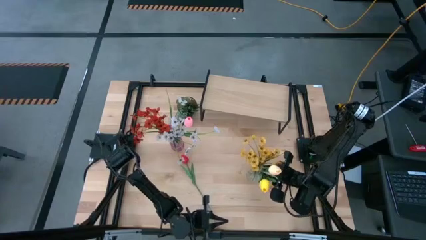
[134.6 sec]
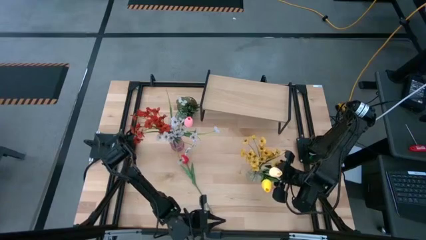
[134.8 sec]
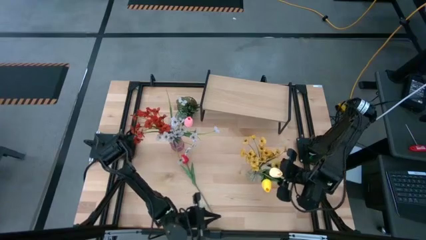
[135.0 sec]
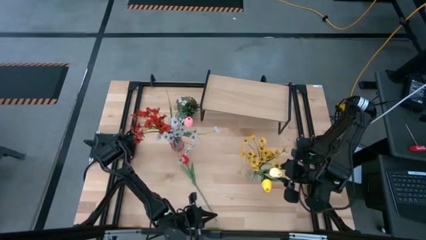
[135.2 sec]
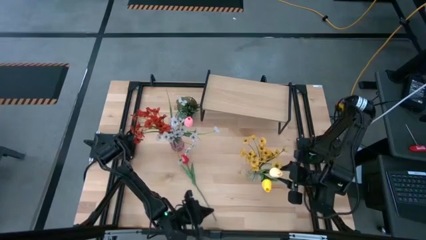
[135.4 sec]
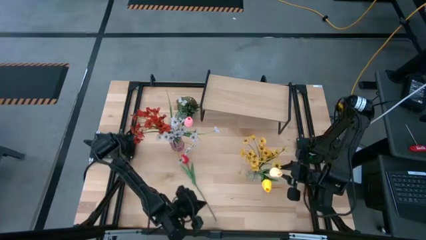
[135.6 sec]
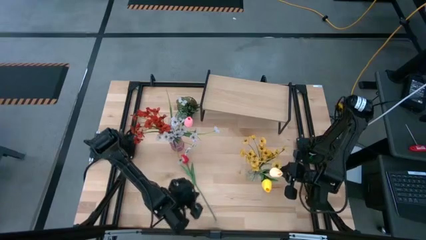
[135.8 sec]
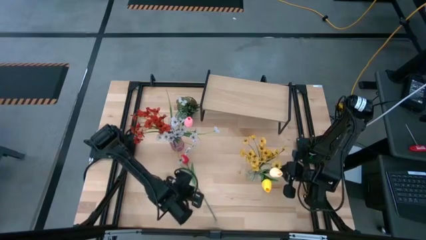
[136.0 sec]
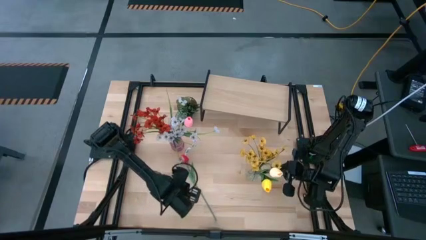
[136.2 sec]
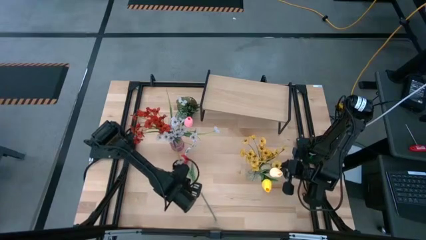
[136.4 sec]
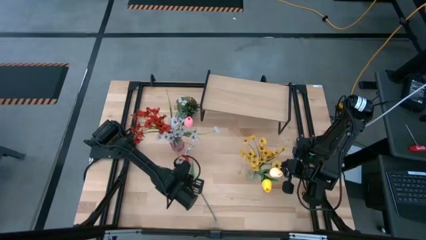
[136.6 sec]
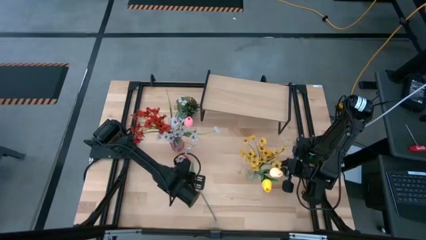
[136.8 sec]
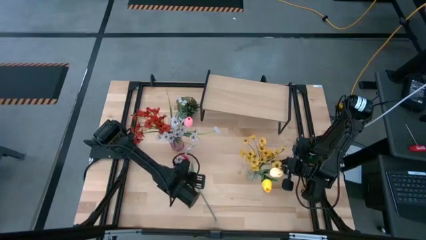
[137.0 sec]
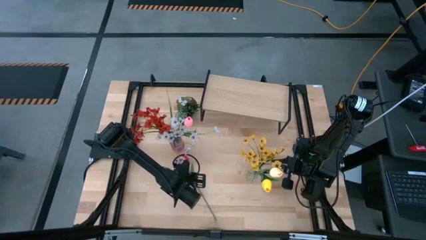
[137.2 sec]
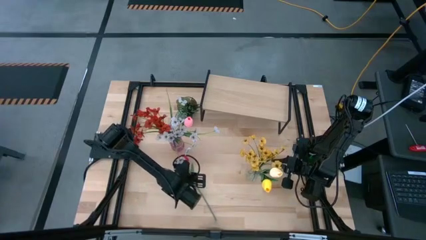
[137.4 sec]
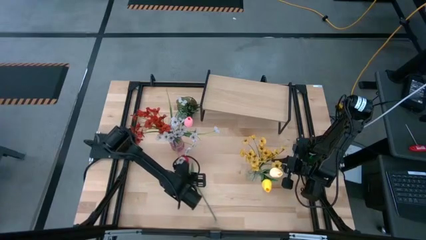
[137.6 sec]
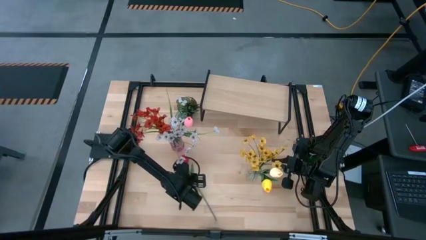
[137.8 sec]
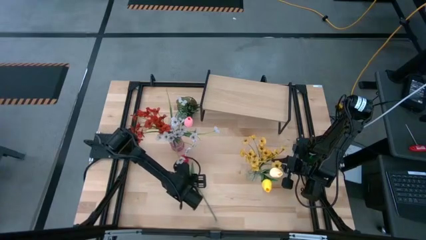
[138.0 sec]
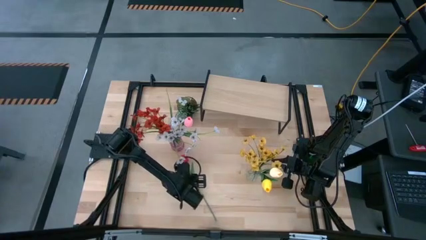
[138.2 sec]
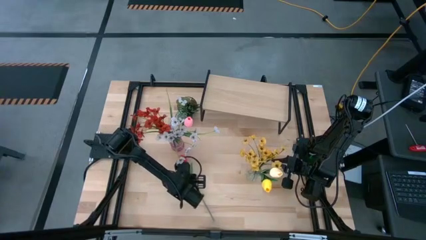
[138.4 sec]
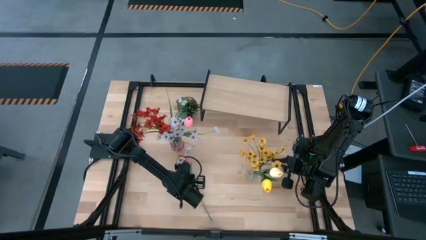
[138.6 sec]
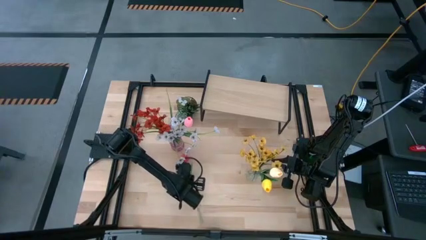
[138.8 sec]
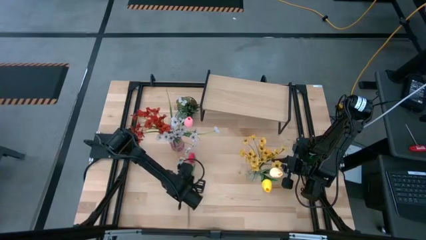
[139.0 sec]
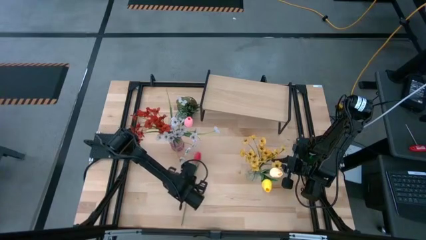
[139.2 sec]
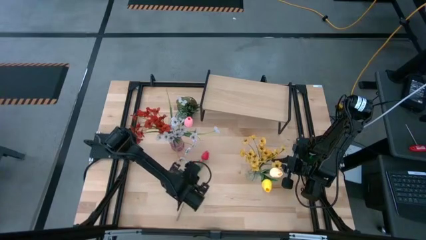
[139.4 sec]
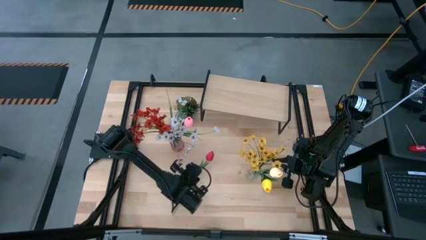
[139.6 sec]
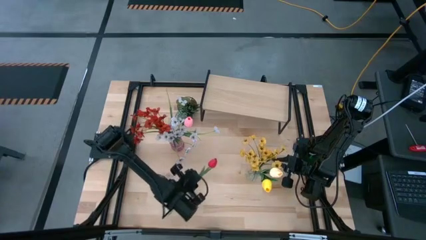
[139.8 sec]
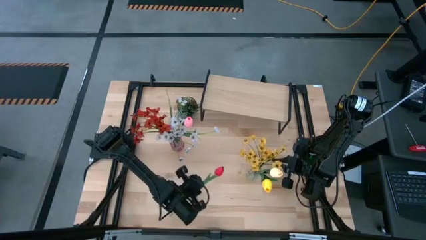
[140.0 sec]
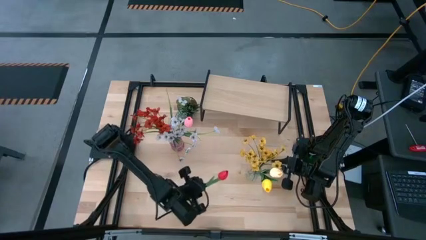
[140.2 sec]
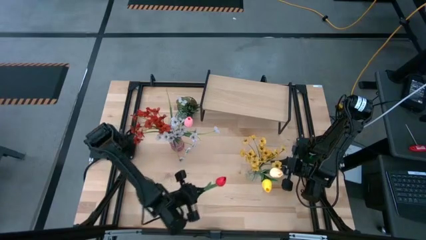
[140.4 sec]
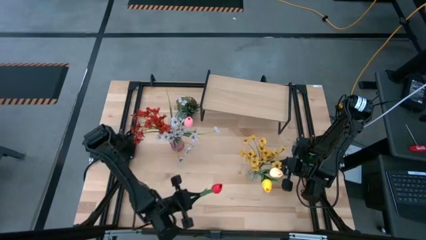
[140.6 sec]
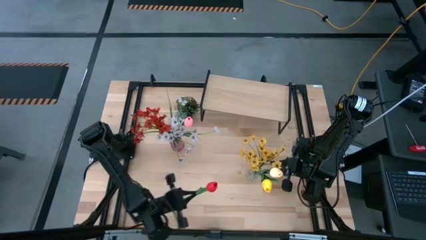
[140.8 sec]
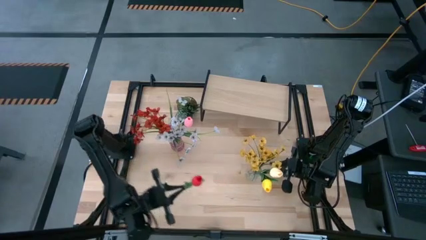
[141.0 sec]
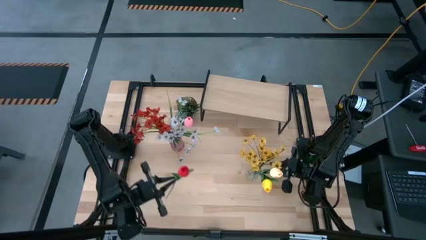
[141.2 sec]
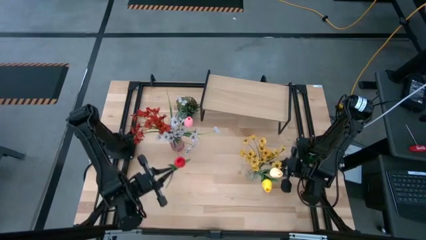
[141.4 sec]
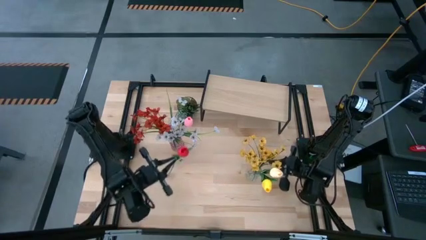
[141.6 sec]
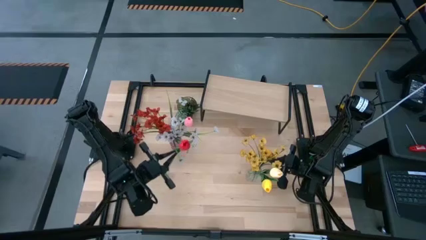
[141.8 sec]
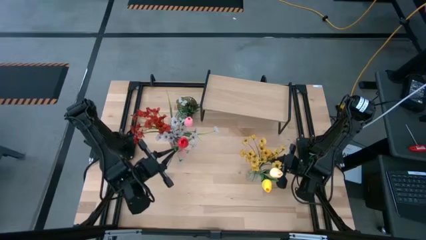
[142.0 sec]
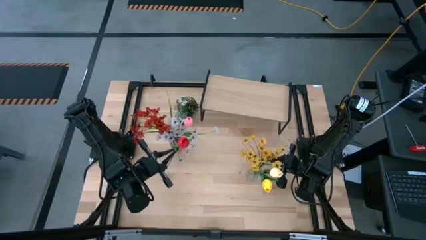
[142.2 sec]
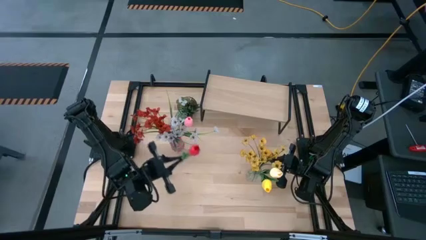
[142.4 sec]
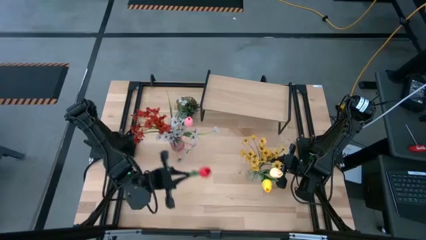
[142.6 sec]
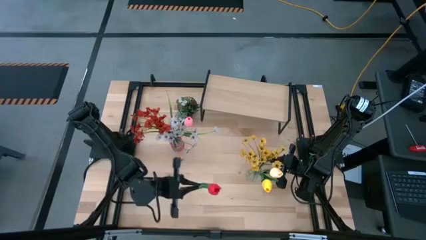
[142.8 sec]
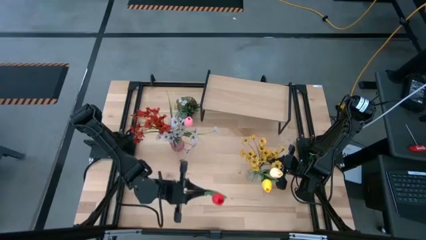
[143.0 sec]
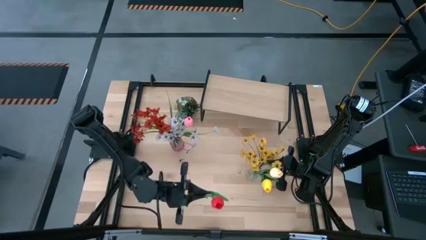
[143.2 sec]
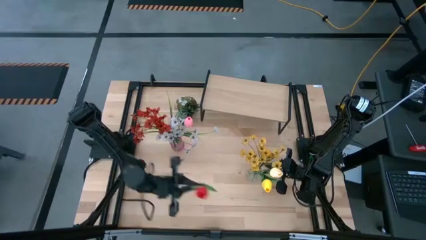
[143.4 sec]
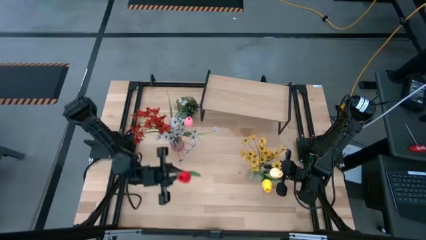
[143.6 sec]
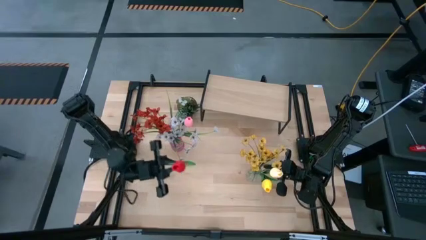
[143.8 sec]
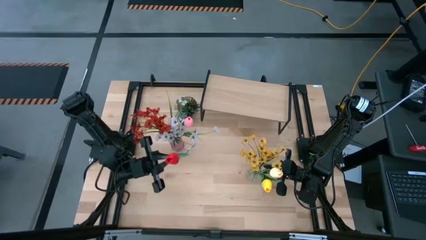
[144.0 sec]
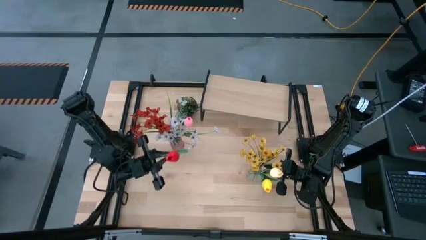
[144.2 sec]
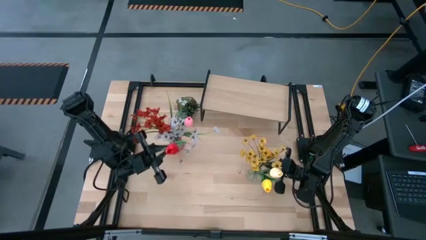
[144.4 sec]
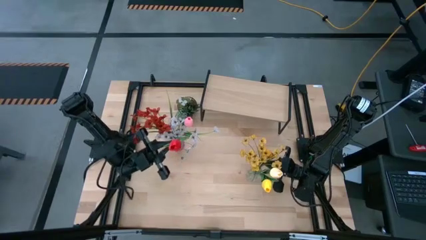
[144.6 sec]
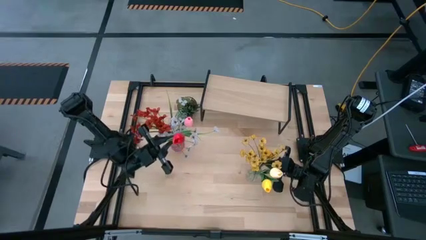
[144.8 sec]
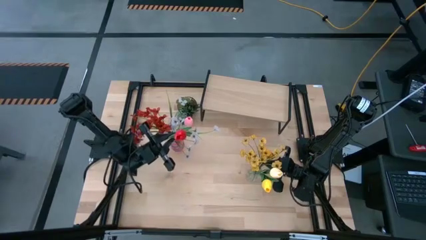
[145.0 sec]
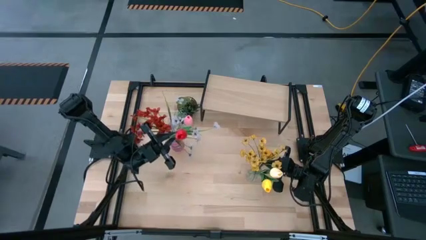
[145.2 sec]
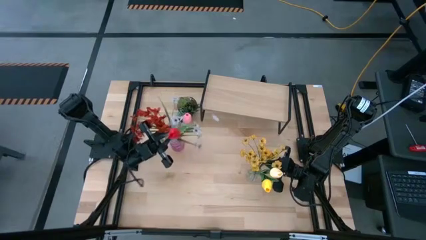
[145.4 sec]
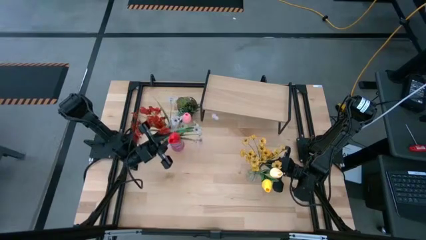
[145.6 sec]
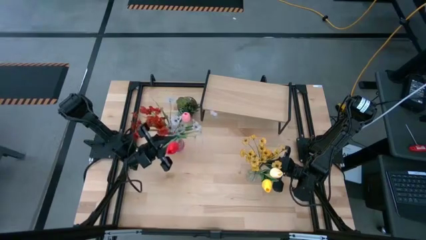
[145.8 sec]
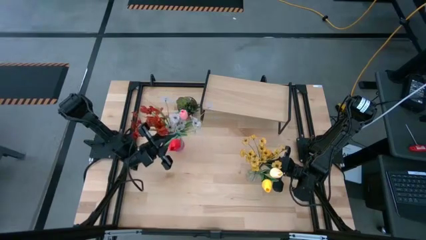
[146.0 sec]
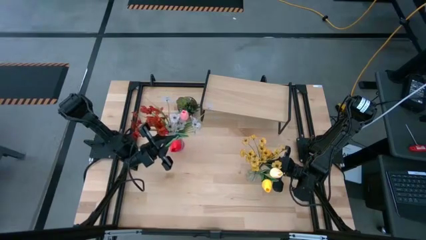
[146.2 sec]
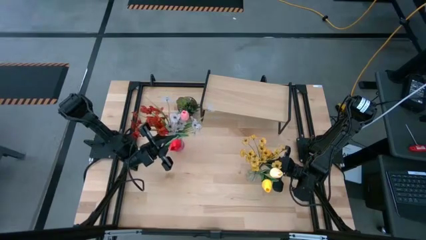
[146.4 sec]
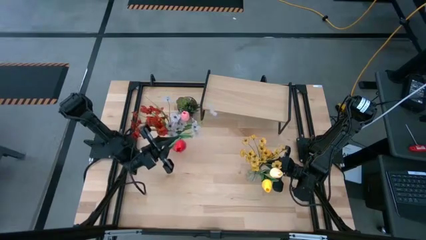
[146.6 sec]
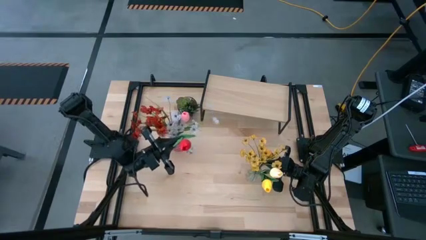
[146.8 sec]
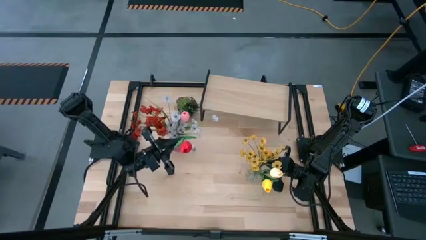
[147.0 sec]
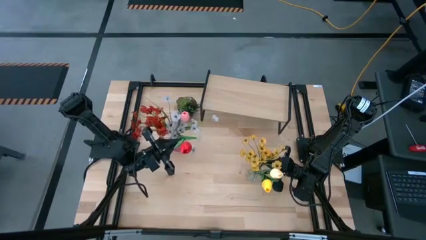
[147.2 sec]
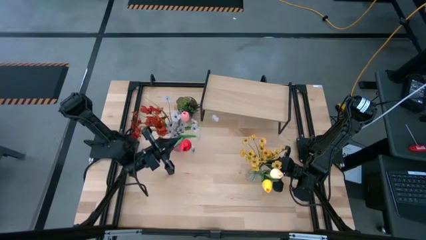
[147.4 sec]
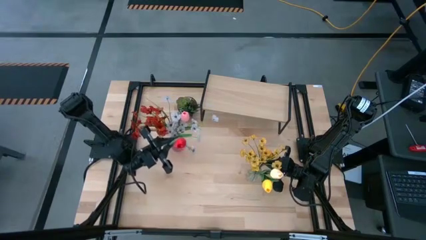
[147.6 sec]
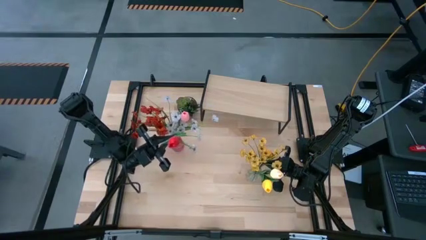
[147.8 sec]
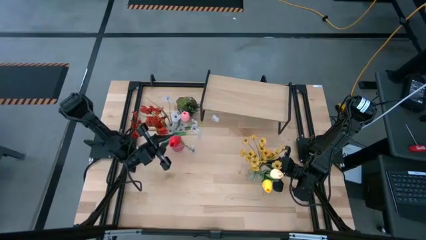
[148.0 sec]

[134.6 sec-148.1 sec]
Task: Pick and place flowers into a vace then onto a shelf
Put the red flower into the violet vase

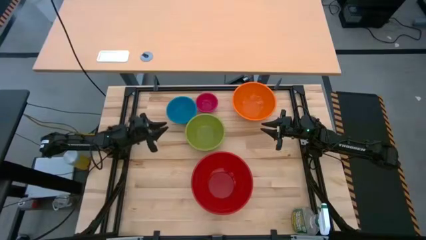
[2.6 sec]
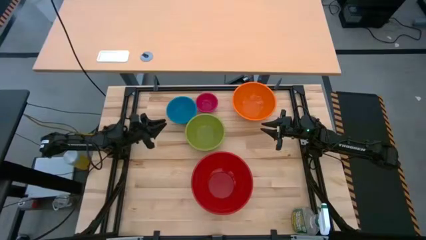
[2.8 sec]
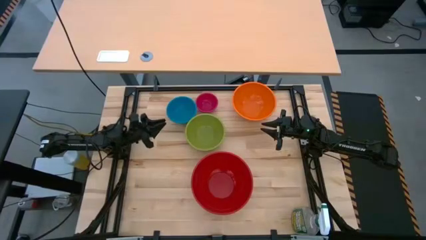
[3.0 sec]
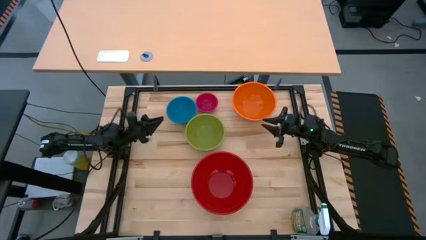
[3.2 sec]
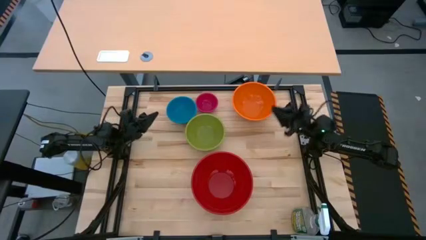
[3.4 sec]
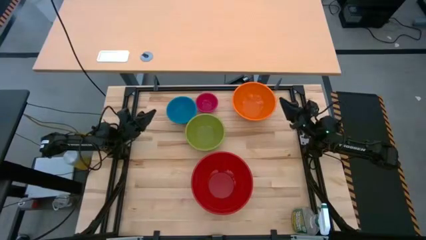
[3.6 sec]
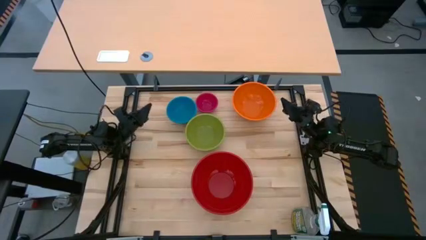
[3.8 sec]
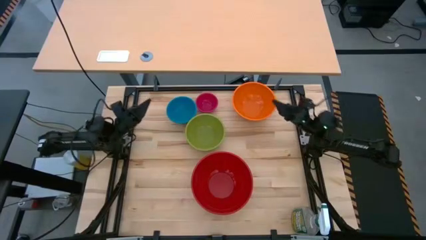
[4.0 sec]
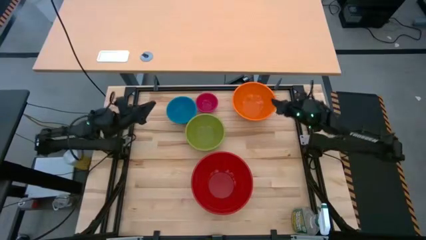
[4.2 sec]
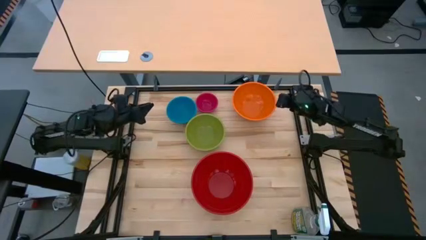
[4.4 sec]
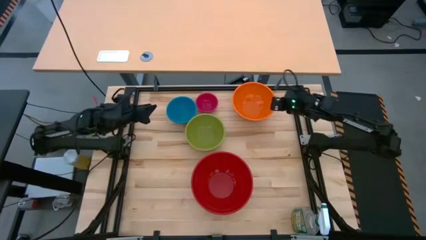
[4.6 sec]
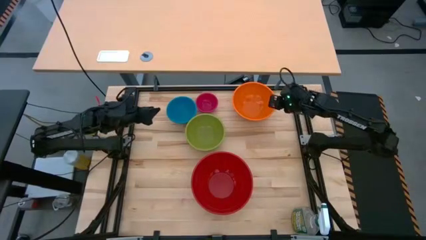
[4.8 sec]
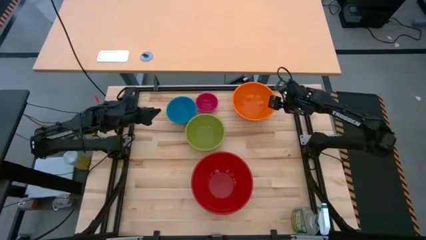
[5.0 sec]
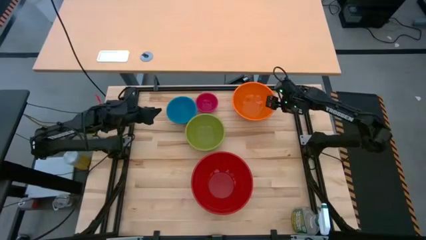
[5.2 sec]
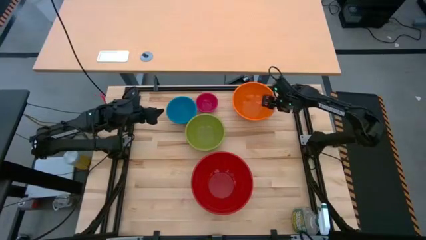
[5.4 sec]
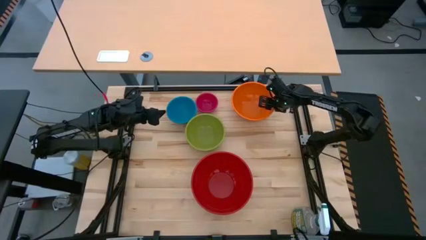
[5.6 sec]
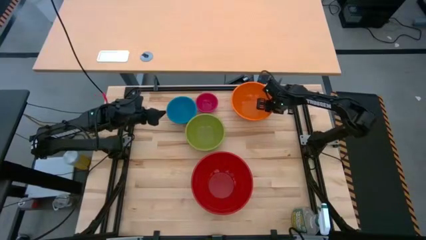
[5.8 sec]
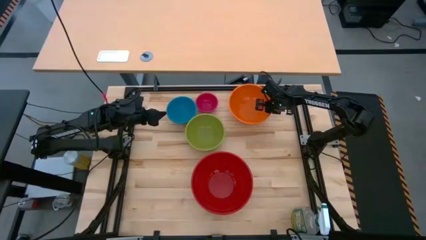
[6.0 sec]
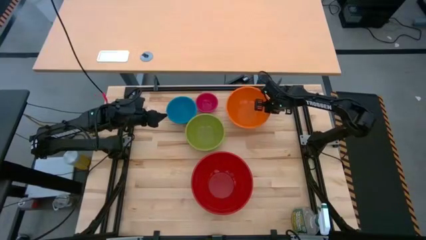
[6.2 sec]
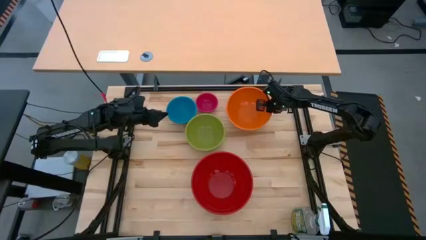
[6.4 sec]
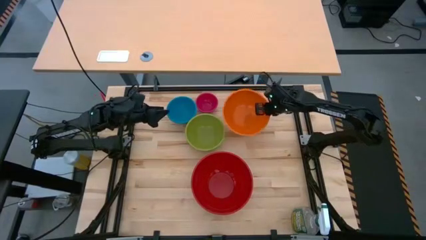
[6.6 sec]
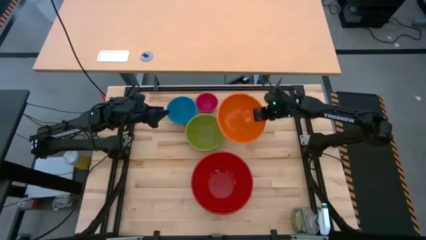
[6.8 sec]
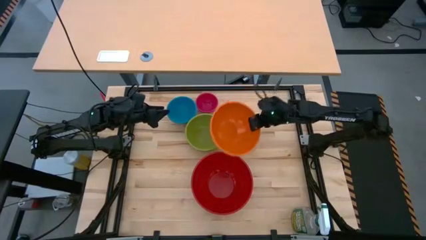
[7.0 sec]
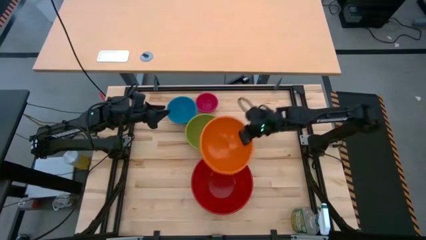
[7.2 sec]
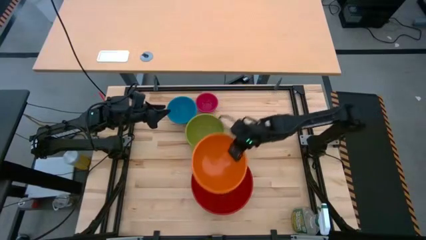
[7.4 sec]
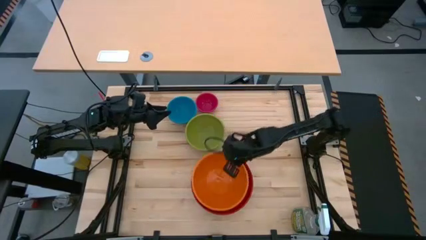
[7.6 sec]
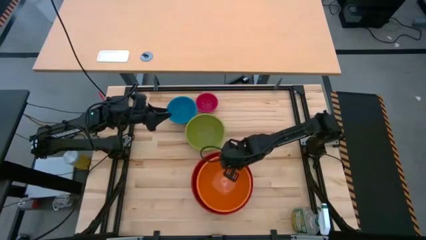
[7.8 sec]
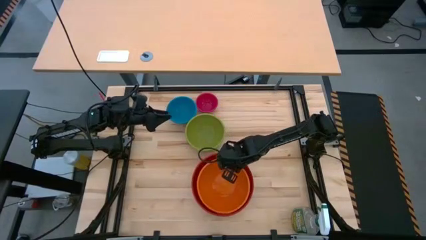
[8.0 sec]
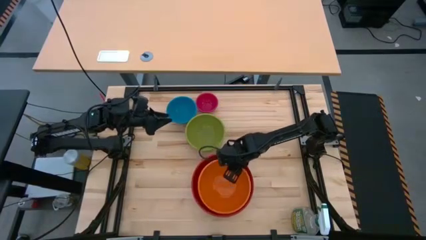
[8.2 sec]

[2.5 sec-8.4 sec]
Task: Nest bowls inside each other by size order
Stack the orange bowl on top of the red bowl
